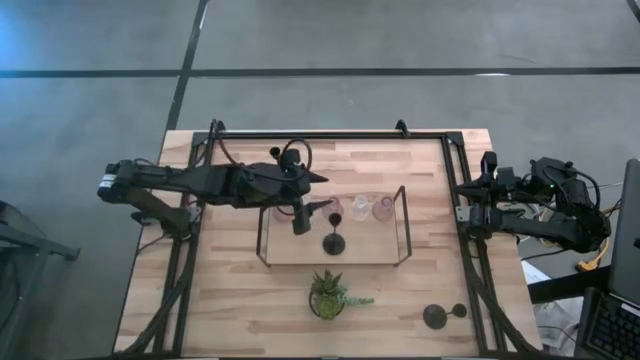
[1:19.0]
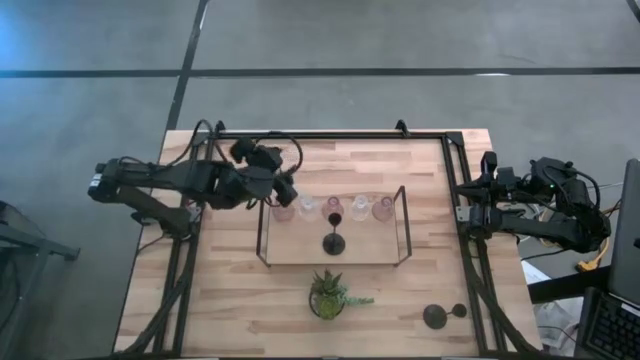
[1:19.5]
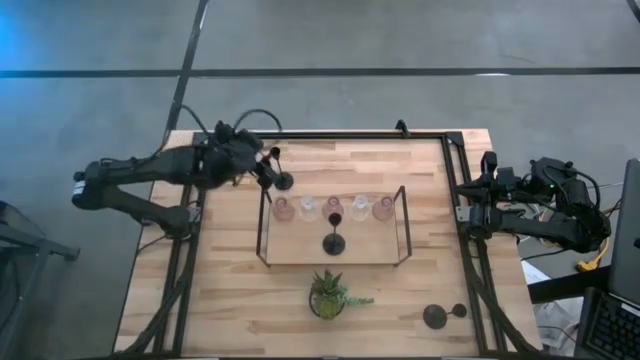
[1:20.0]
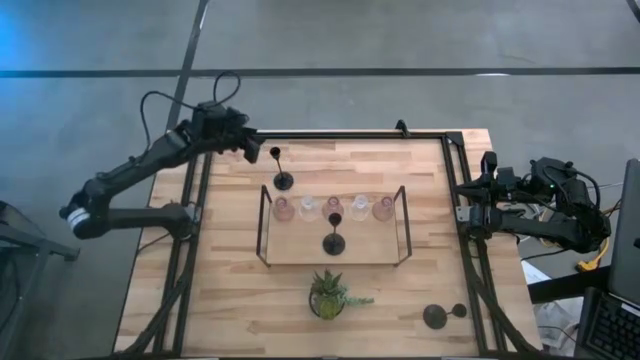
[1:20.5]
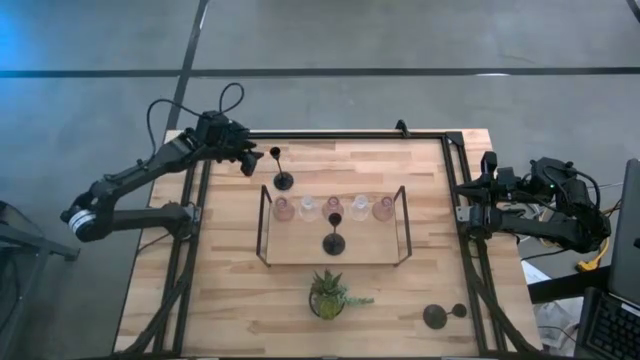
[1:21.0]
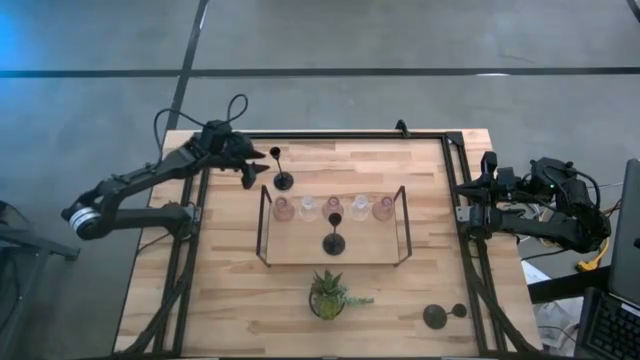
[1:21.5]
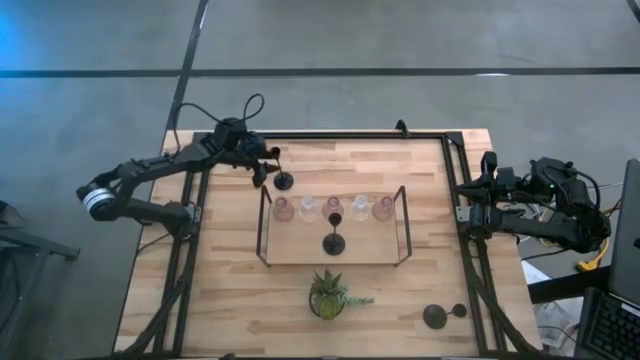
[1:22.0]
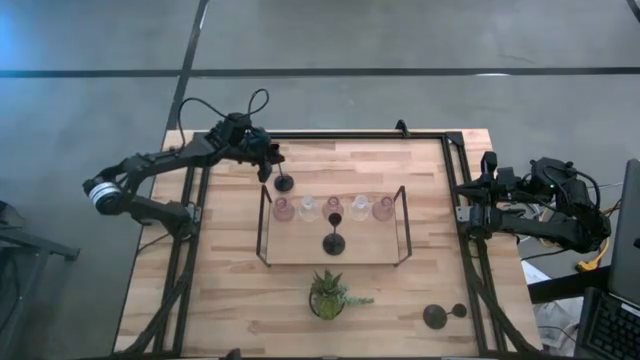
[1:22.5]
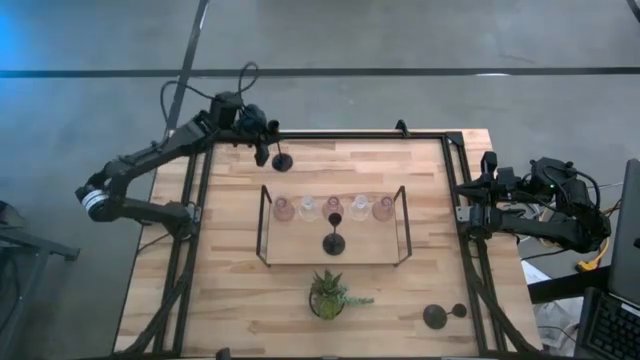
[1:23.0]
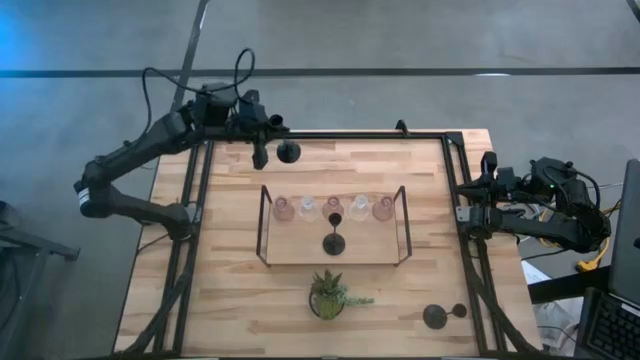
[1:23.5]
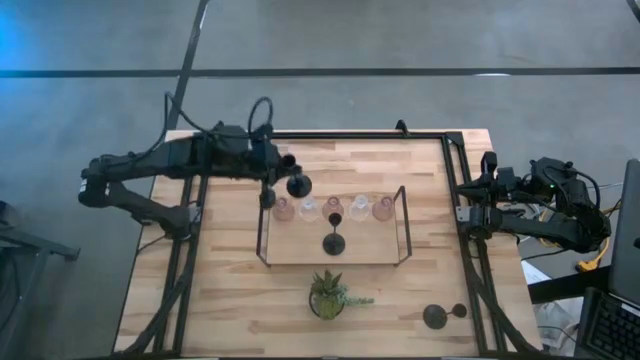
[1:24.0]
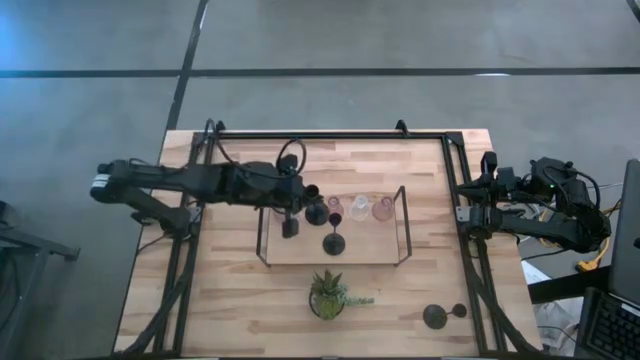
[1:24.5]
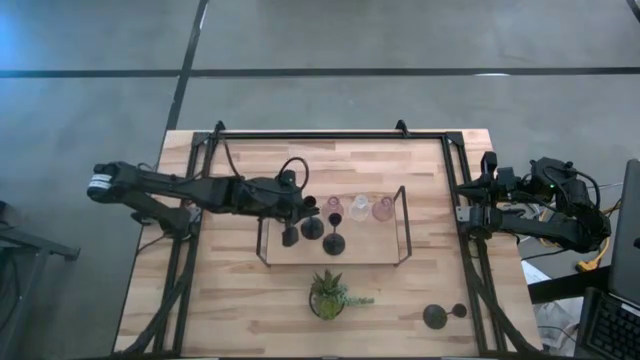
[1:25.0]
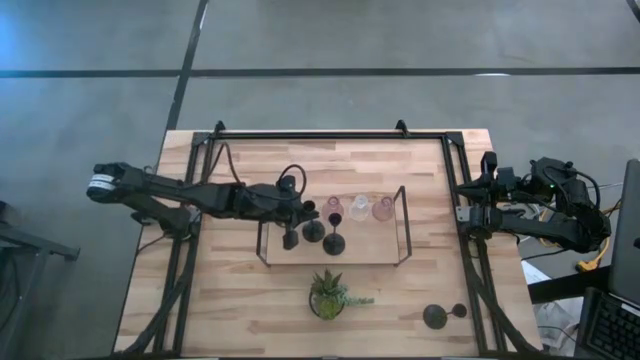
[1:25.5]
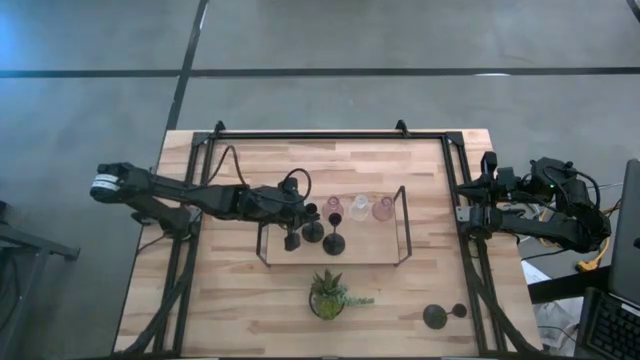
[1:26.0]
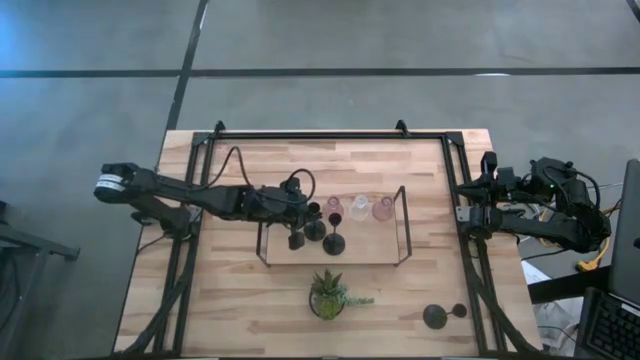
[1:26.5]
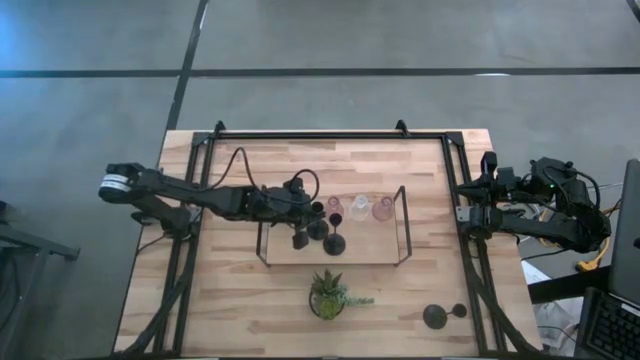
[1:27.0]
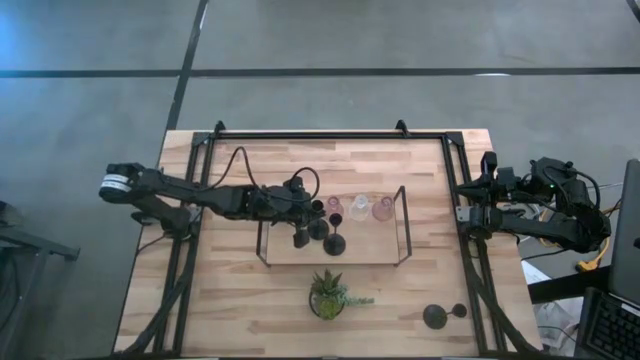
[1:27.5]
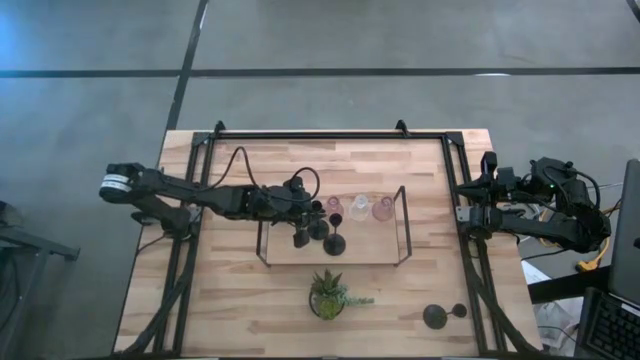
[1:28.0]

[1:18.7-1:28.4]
Task: Pick & Place candle stick holders
Put the top black candle holder on the shelf

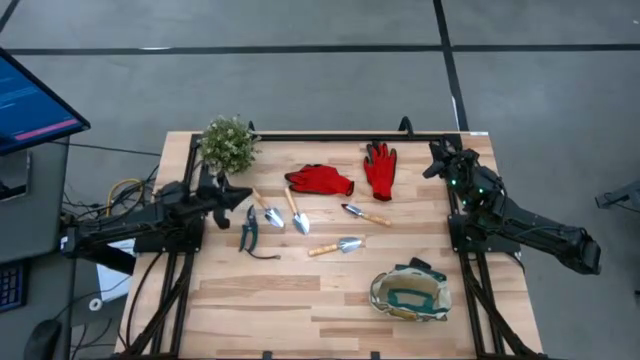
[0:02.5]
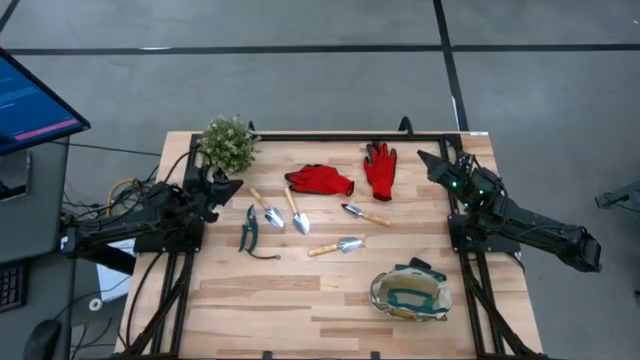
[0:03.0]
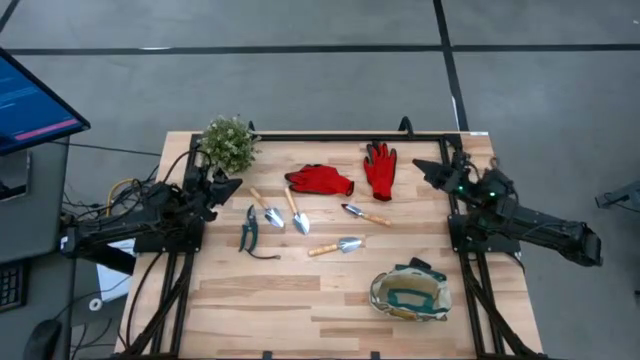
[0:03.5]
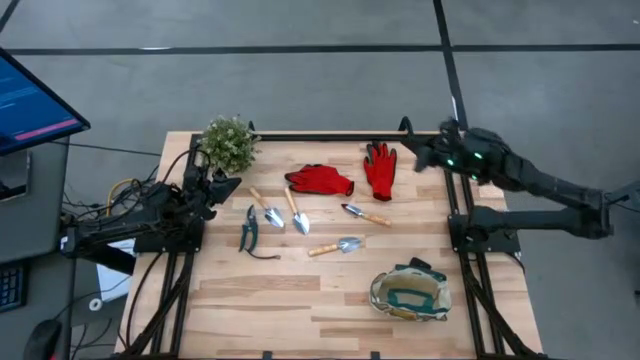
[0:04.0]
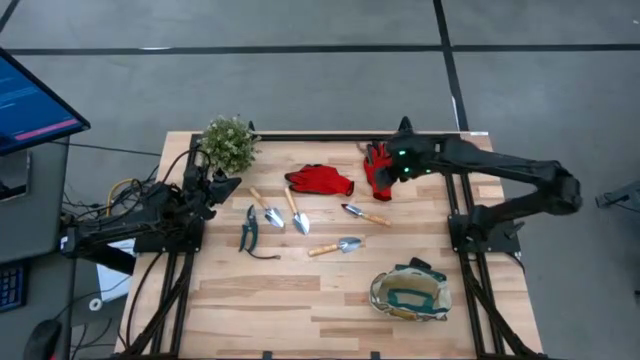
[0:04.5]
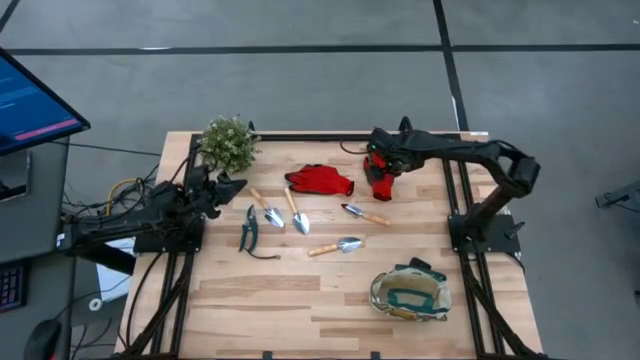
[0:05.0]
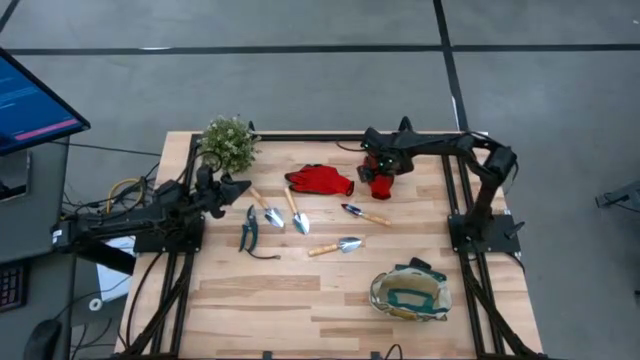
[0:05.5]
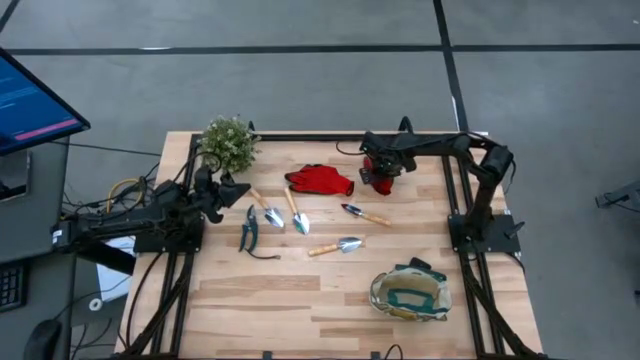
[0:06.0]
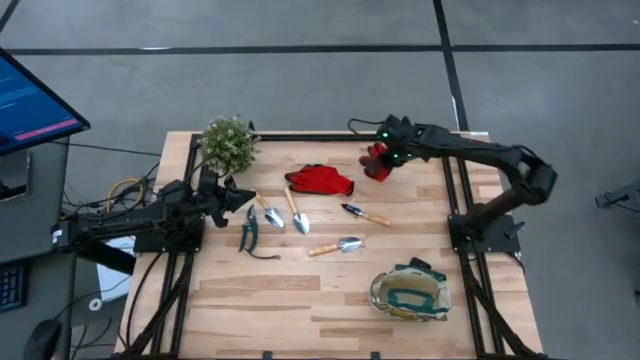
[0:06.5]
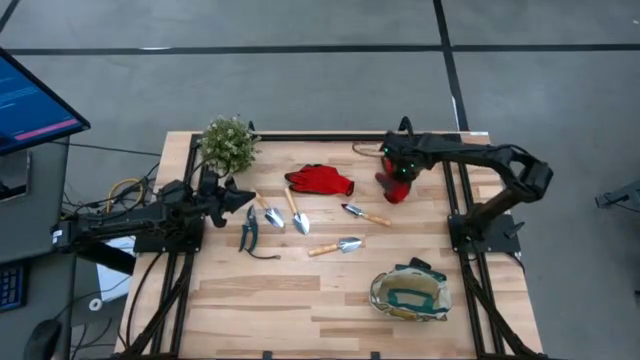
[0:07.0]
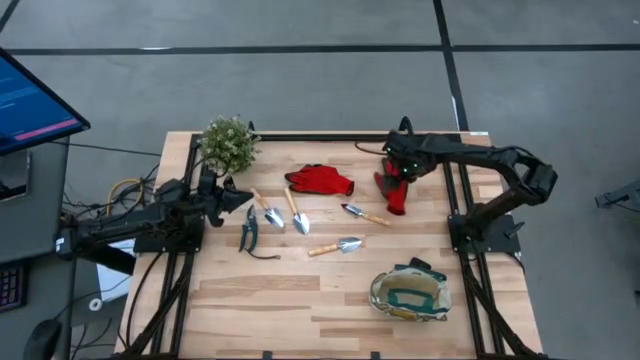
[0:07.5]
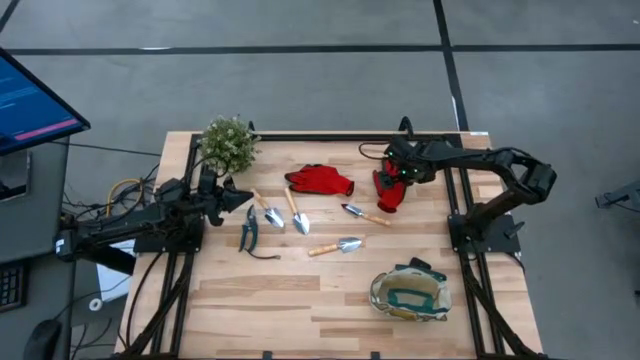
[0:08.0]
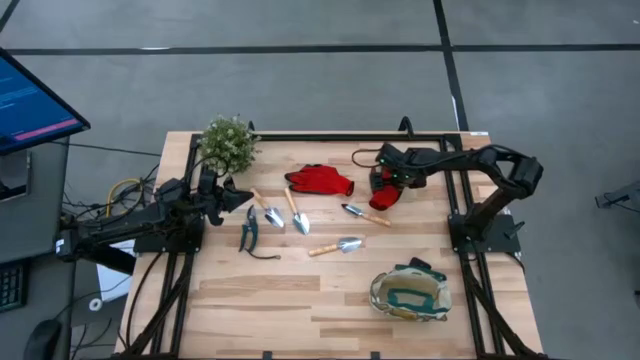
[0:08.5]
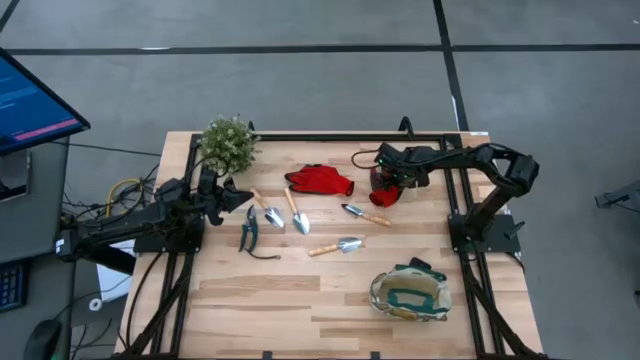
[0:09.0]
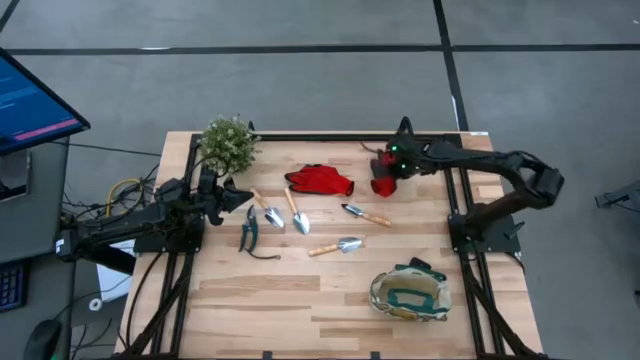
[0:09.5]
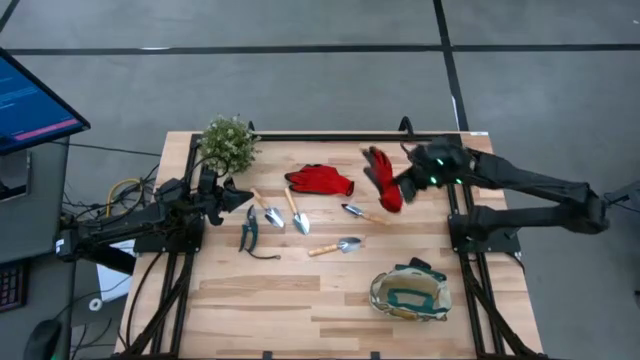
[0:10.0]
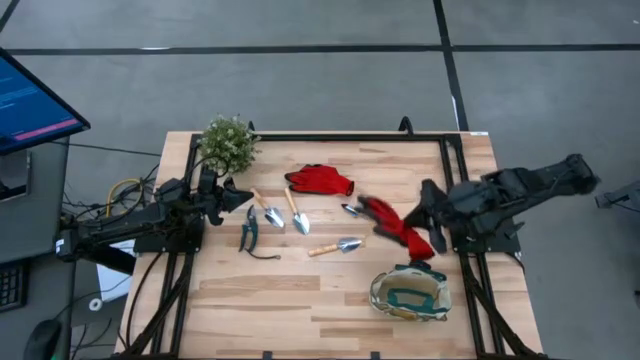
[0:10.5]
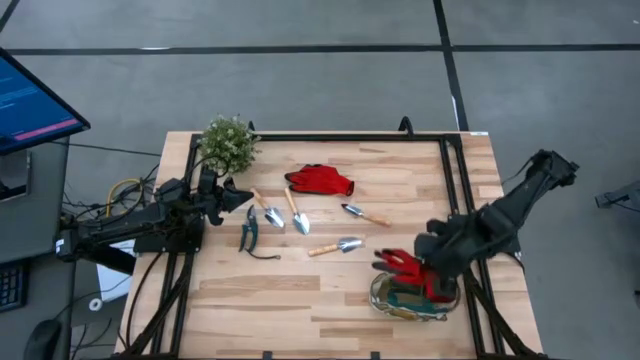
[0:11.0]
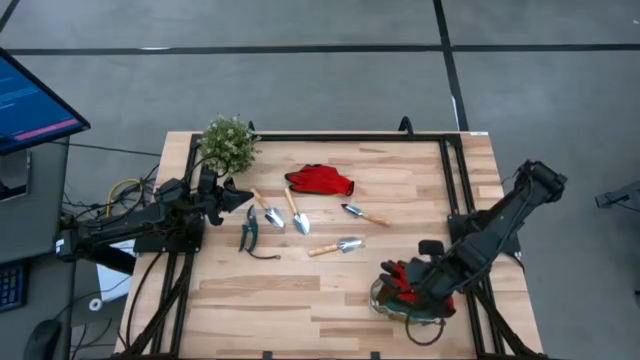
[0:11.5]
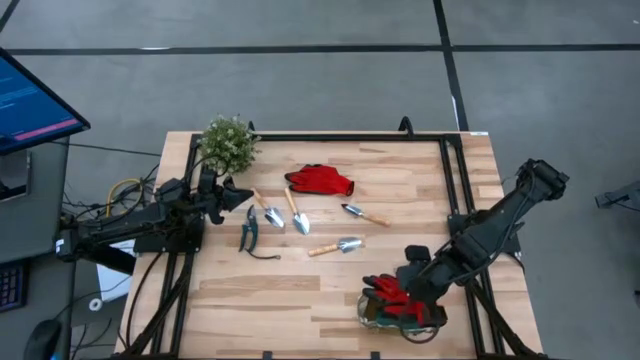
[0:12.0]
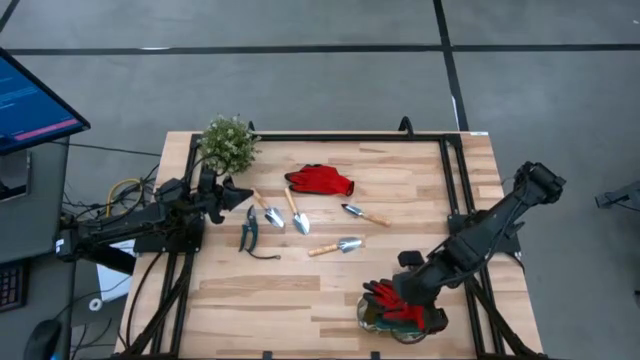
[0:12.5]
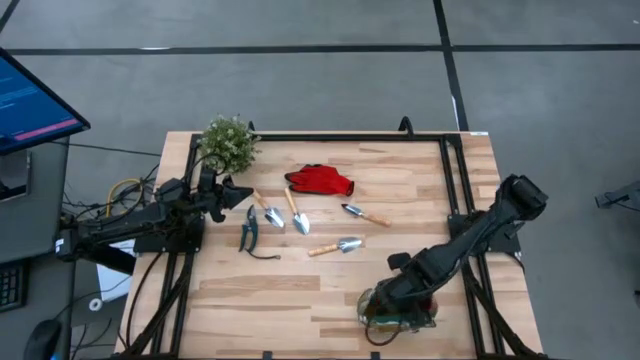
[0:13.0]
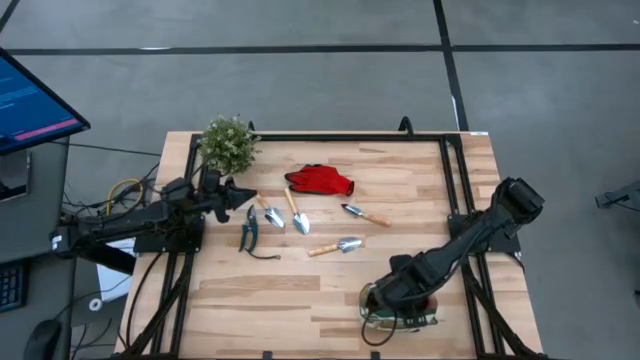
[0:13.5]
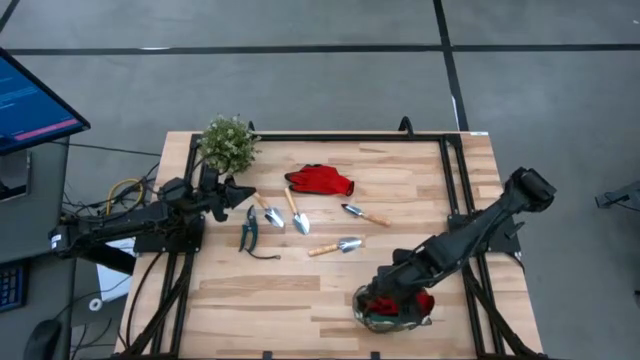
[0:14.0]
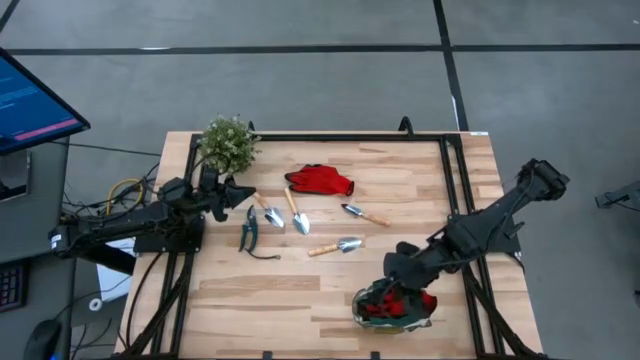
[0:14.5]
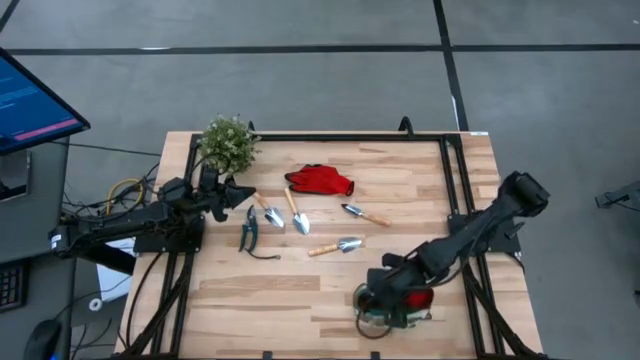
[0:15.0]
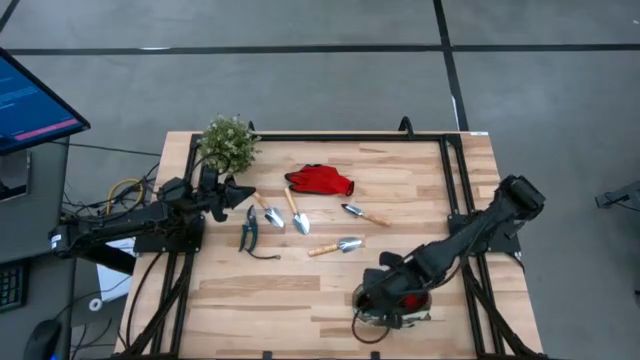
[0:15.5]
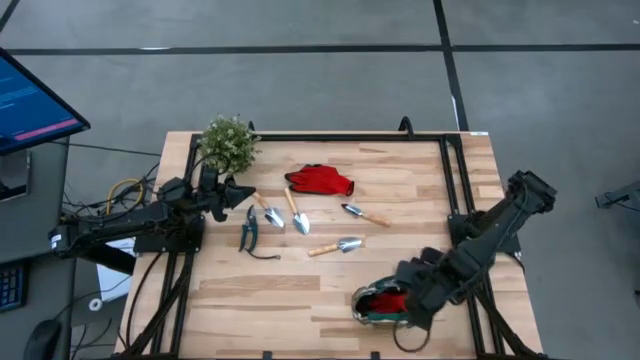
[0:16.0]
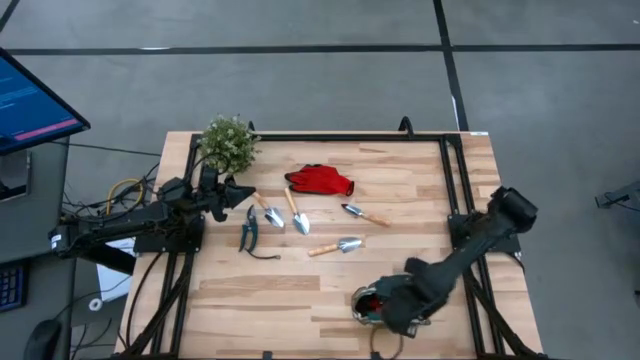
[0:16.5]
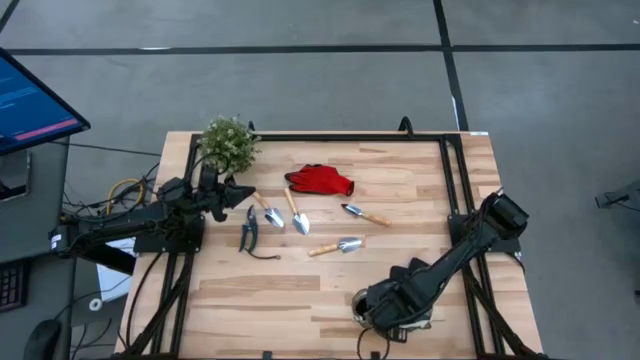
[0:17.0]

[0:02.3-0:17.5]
Task: Pick & Place Garden tools in Gardening bag
Put the red glove into the gardening bag
